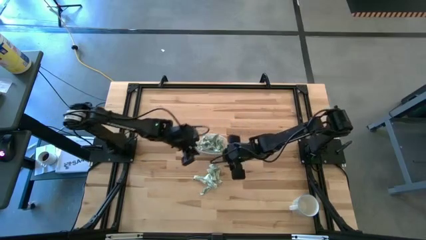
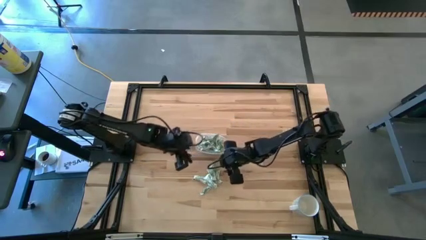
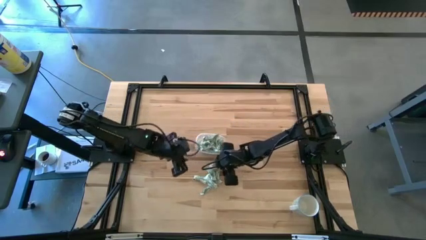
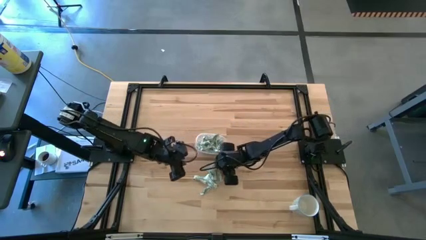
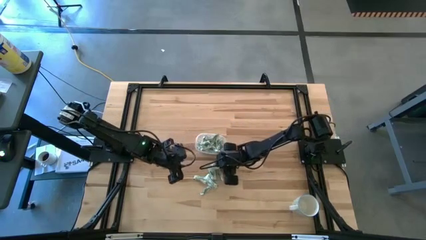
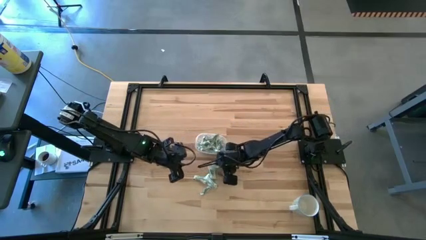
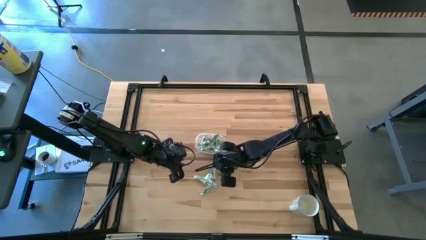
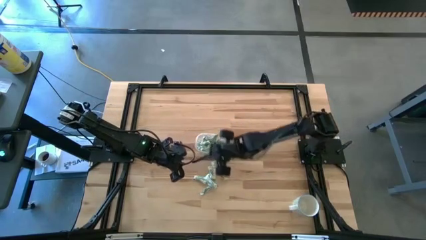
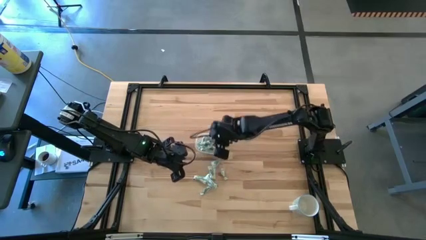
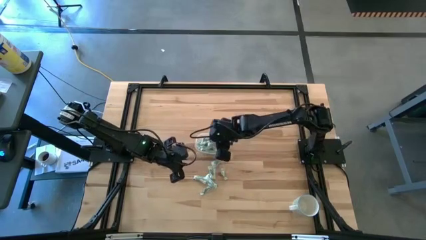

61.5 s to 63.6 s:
Task: Pick and place Stevia / Truvia into bins
Put the stevia packet into the transparent container

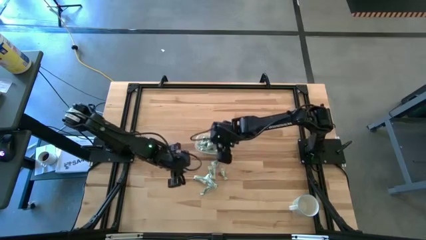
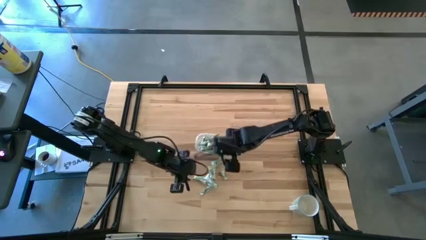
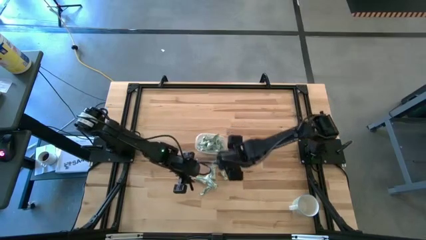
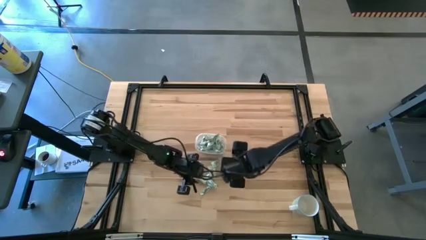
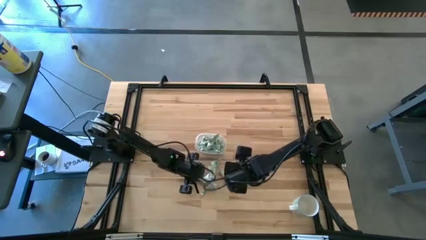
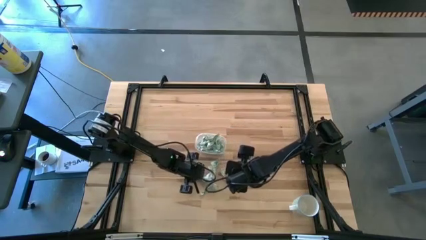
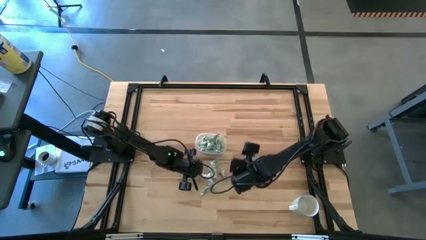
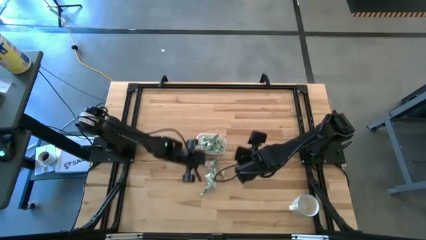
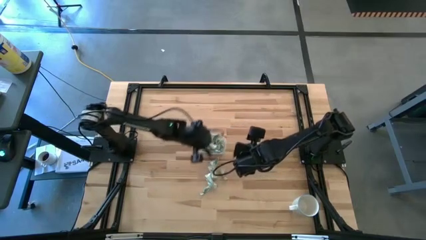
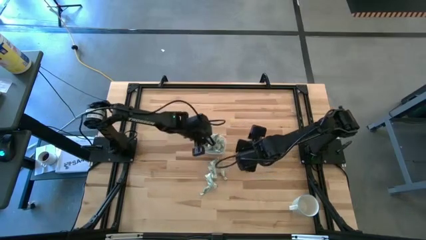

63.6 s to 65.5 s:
Put the stevia packet into the transparent container

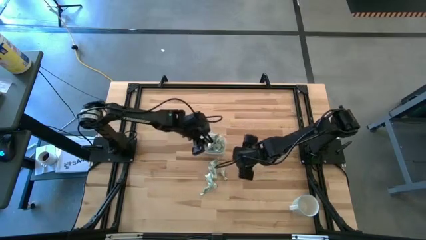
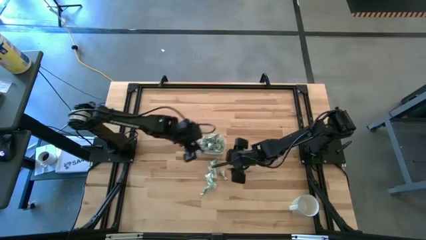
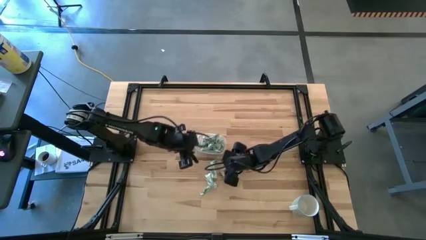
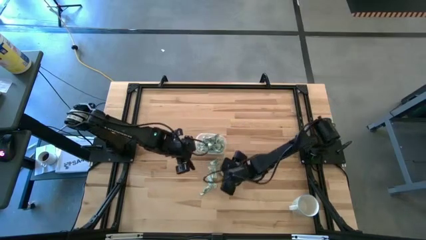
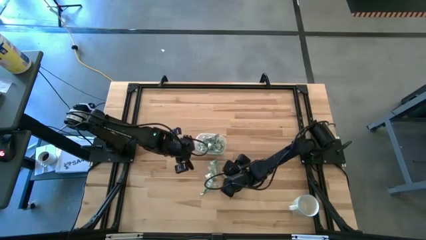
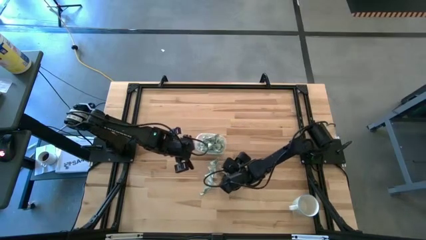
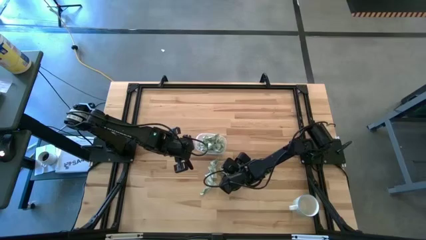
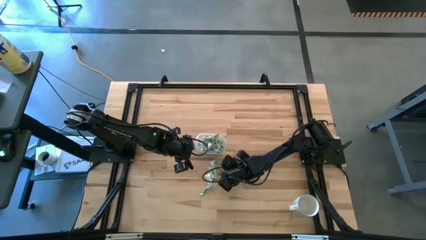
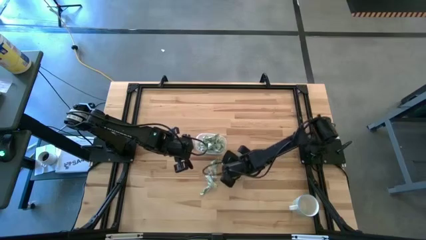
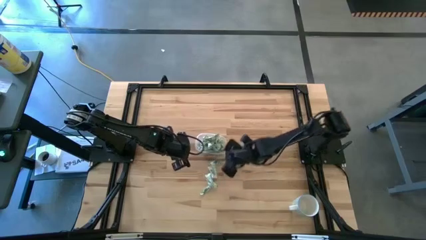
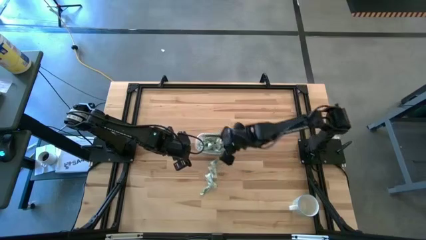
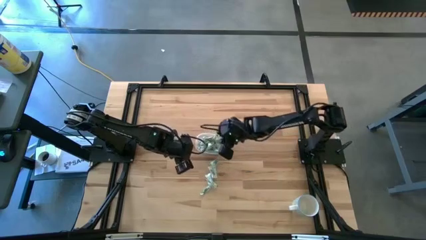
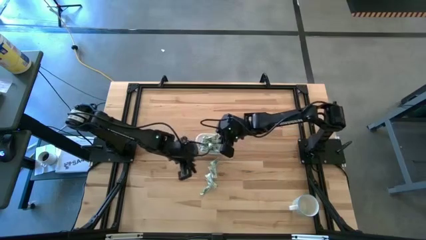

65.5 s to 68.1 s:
Put the stevia packet into the transparent container

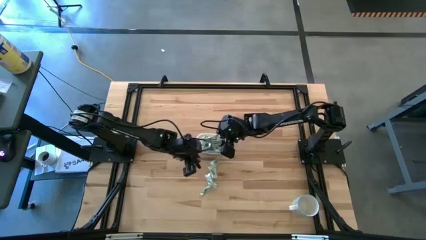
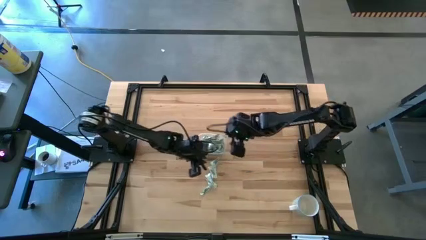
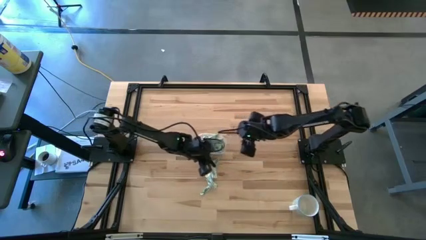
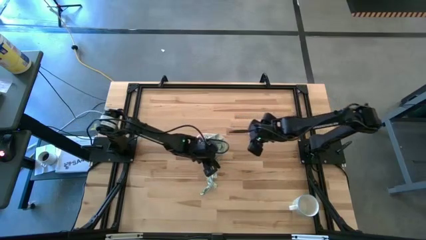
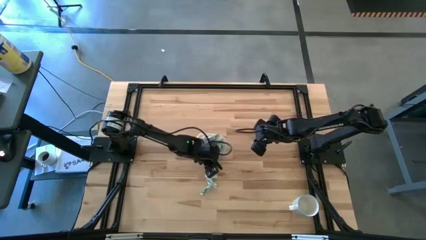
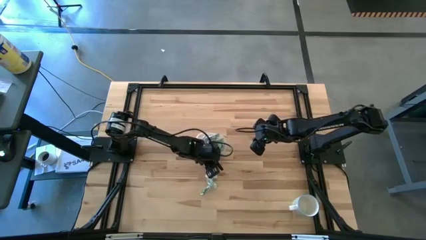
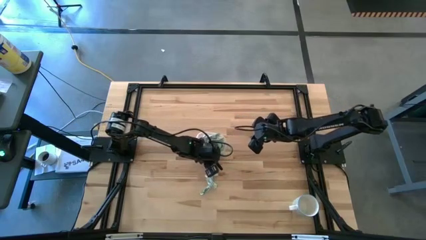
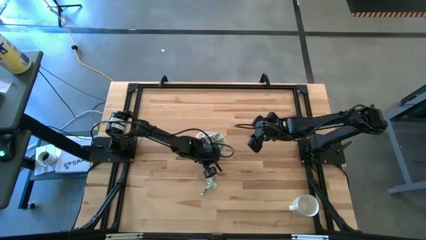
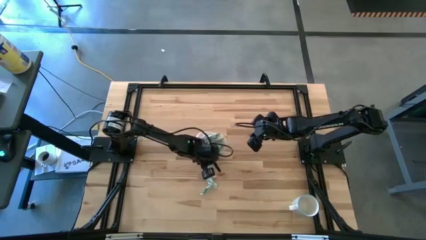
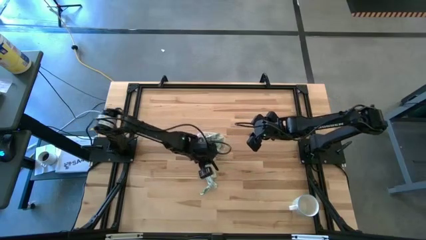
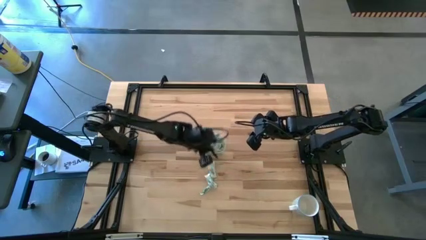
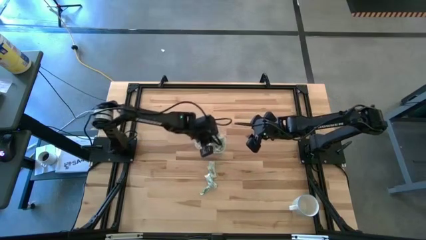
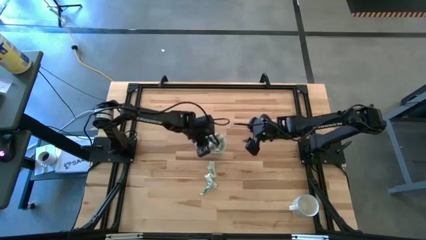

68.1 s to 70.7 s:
Put the stevia packet into the transparent container

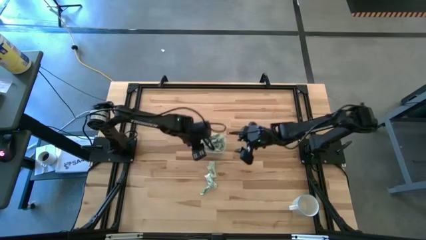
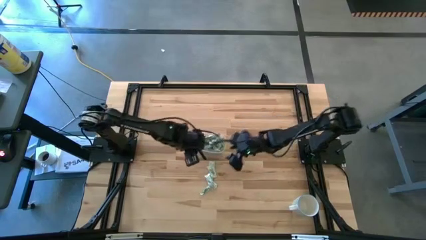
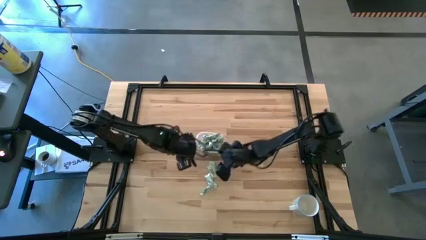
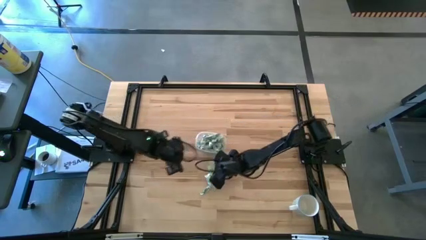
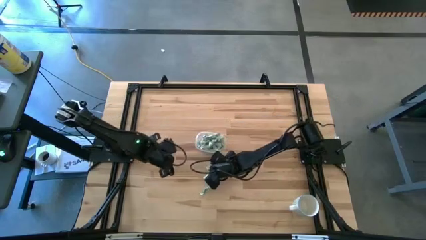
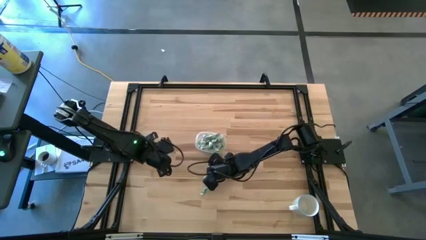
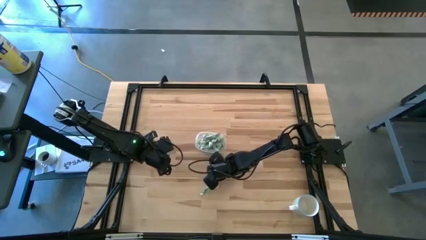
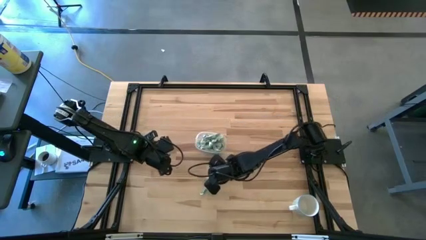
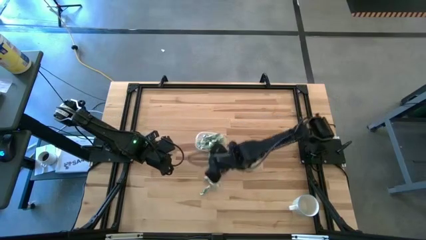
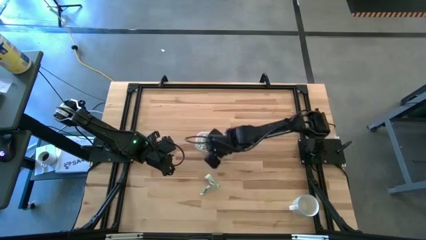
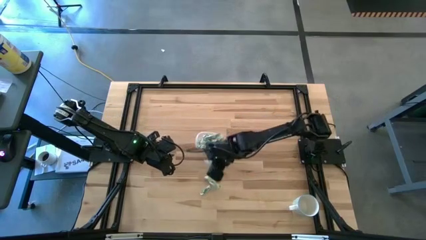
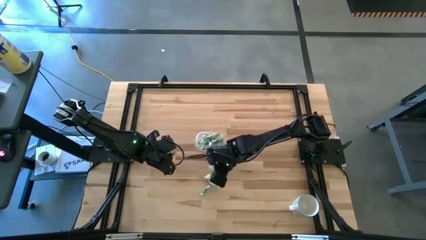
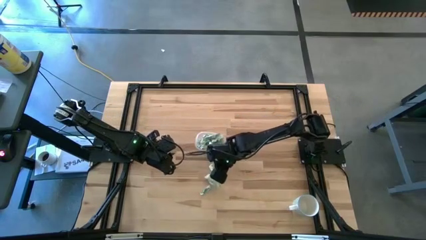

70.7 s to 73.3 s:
Put the stevia packet into the transparent container

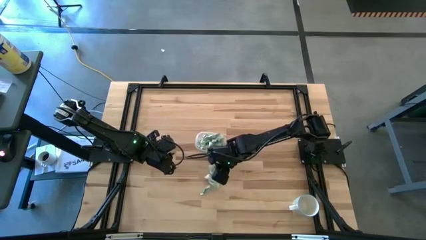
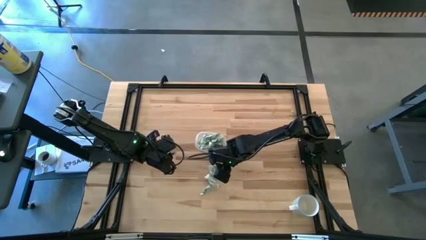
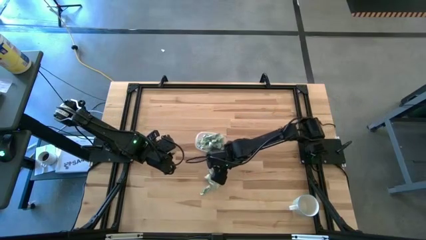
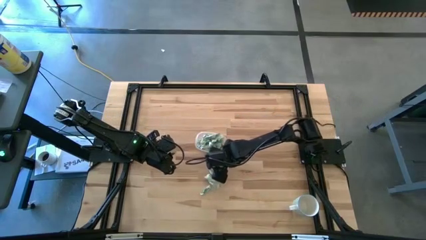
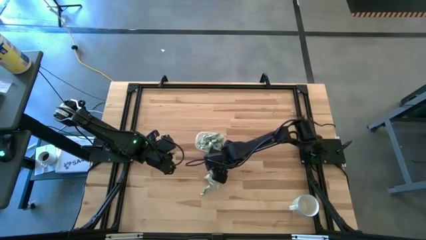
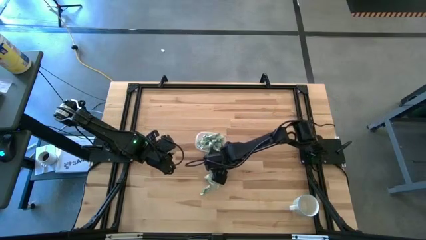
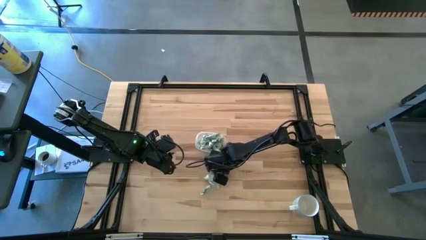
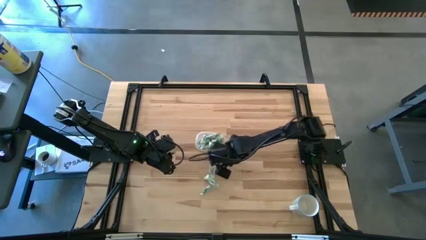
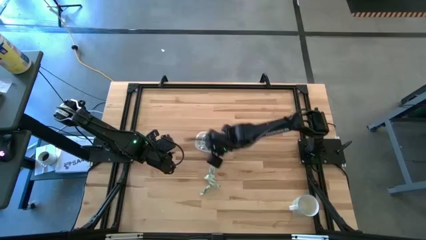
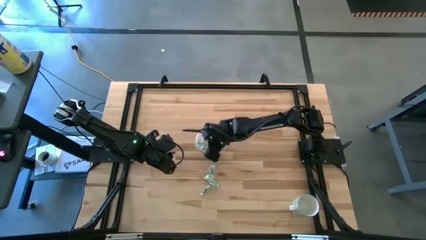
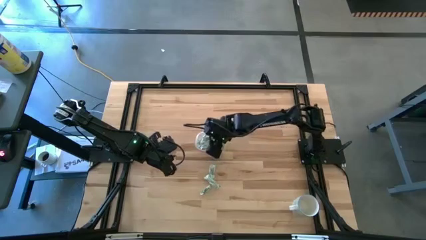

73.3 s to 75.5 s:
Put the stevia packet into the transparent container

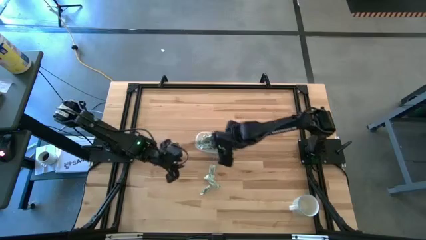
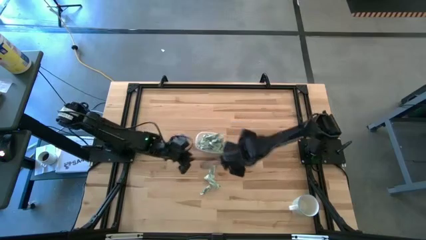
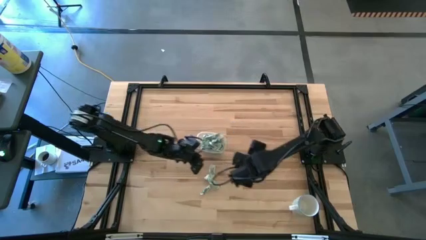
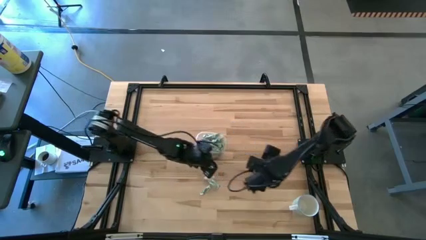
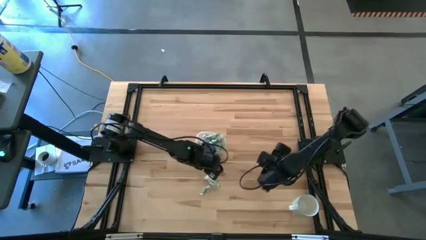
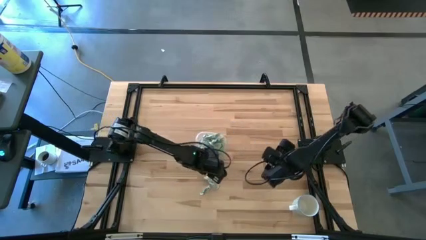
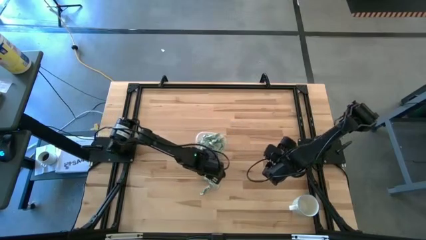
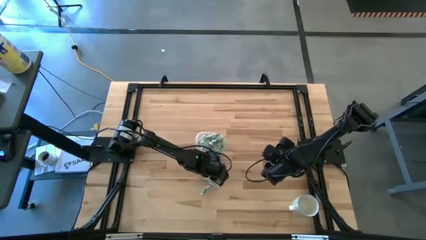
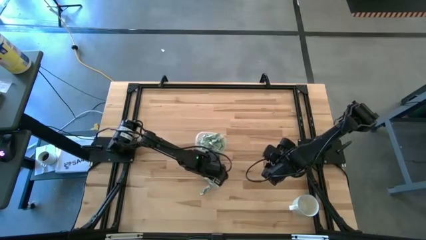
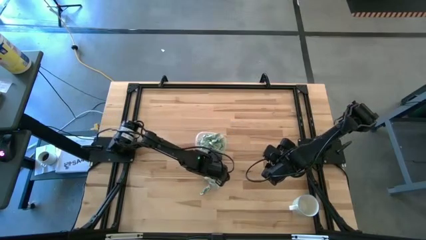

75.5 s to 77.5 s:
Put the stevia packet into the transparent container

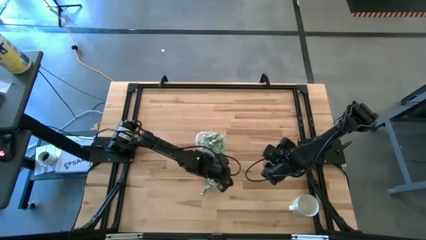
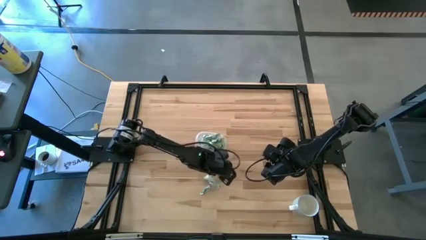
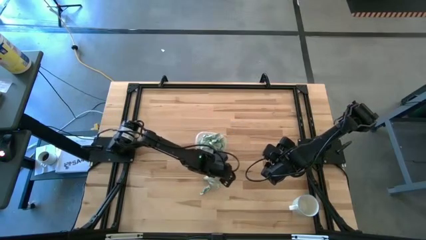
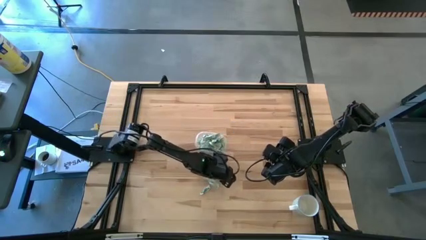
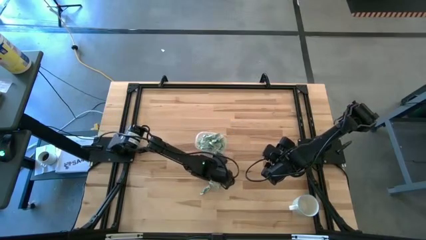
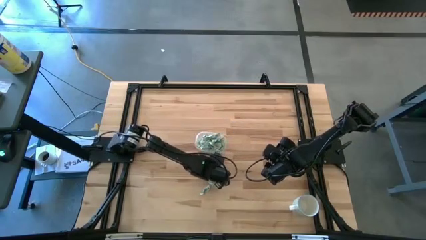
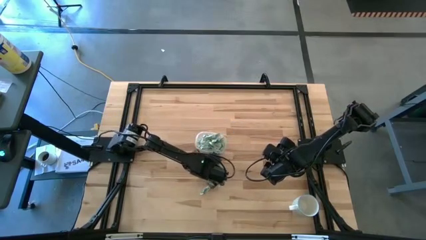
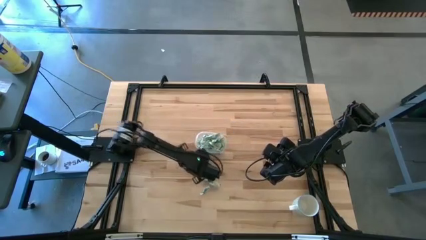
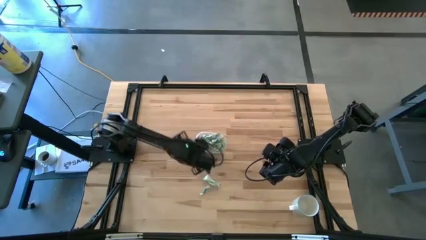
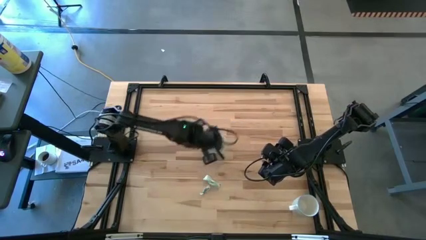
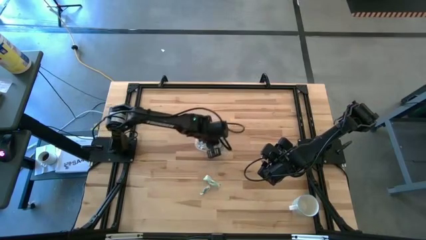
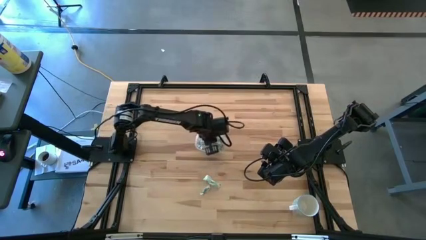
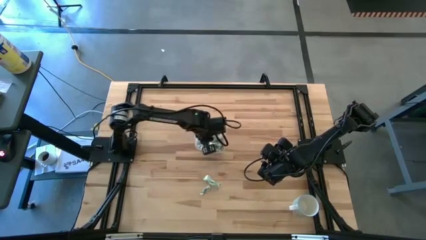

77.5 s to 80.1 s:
Put the stevia packet into the transparent container
